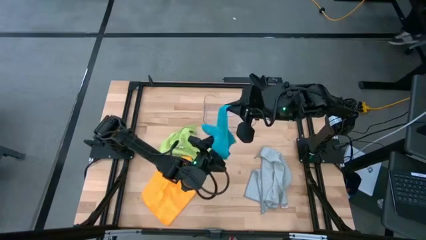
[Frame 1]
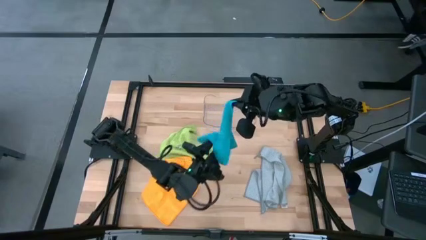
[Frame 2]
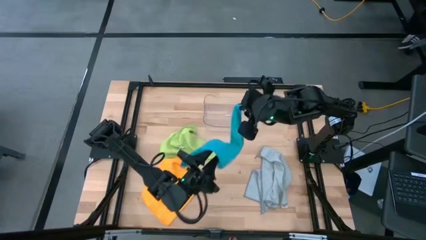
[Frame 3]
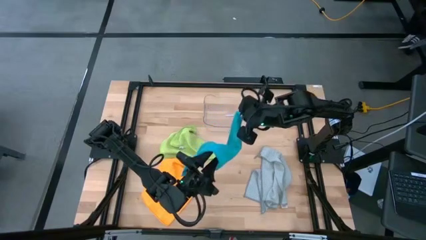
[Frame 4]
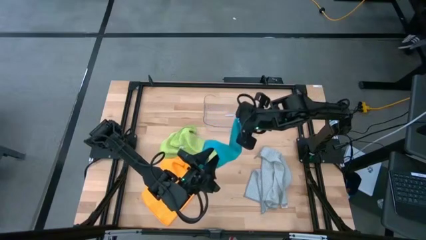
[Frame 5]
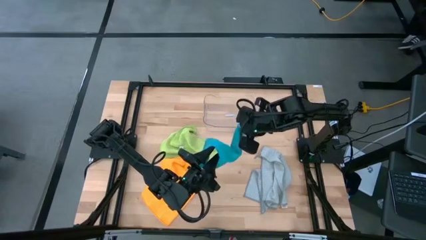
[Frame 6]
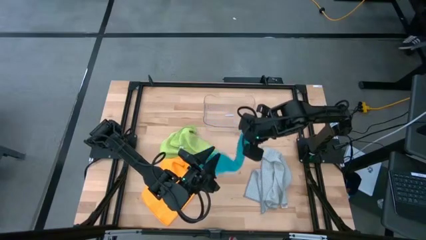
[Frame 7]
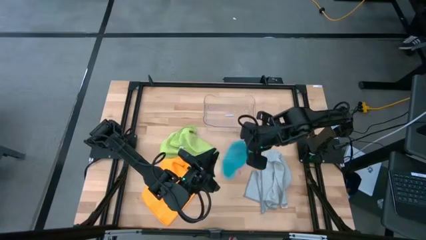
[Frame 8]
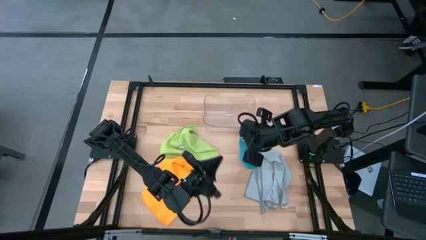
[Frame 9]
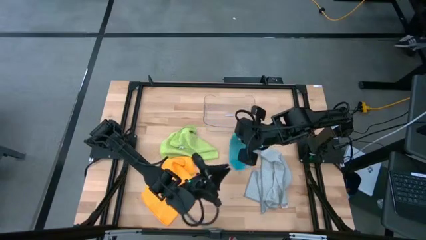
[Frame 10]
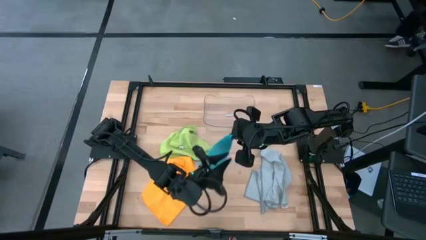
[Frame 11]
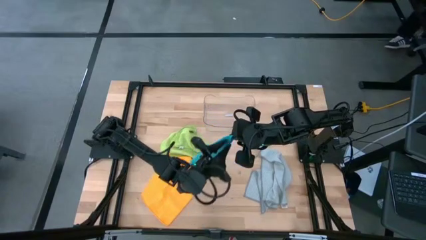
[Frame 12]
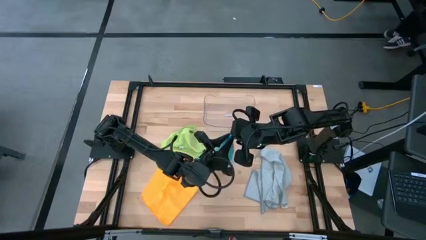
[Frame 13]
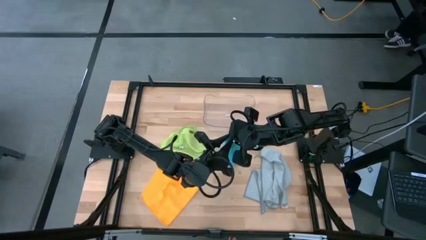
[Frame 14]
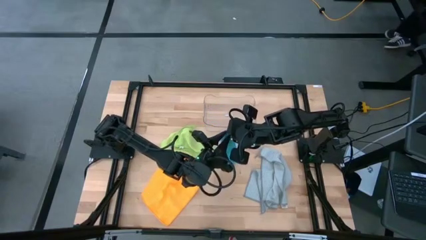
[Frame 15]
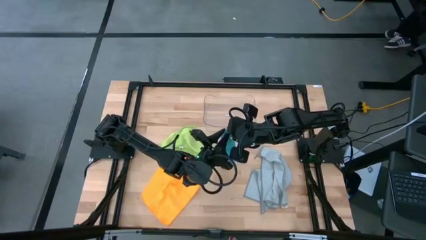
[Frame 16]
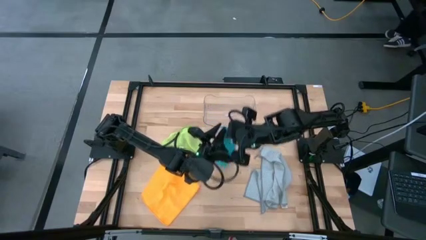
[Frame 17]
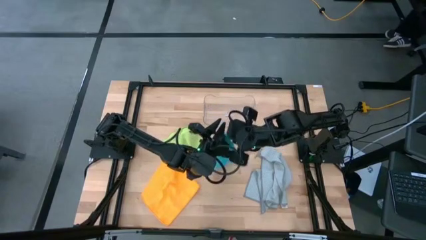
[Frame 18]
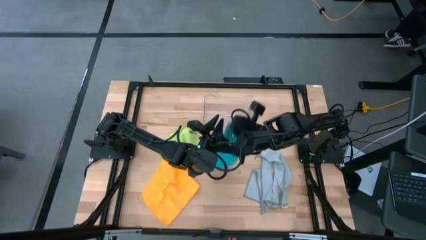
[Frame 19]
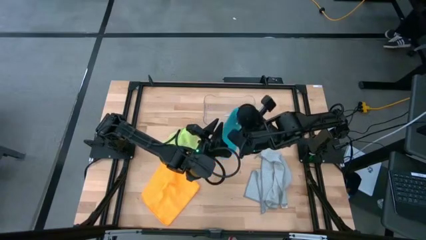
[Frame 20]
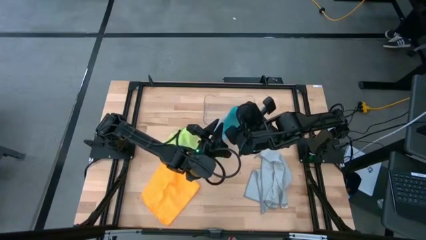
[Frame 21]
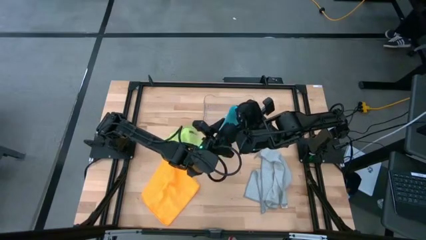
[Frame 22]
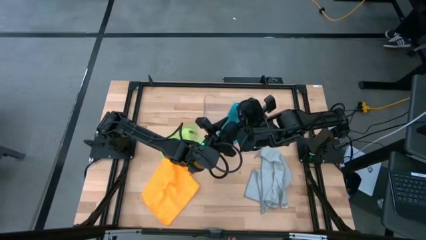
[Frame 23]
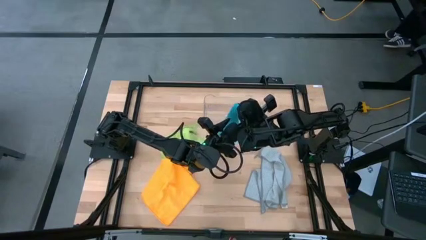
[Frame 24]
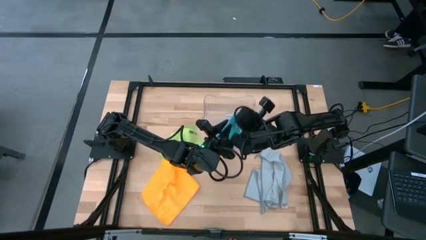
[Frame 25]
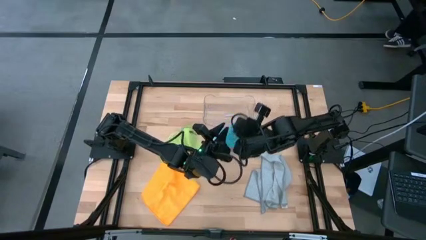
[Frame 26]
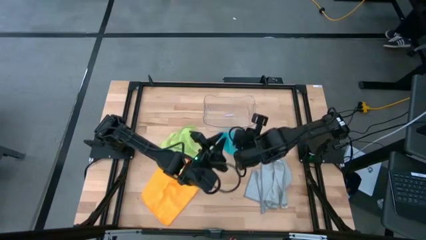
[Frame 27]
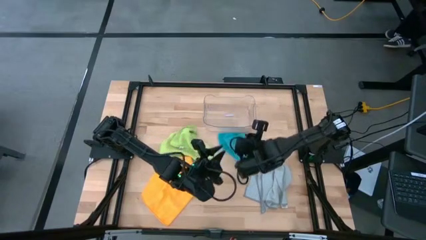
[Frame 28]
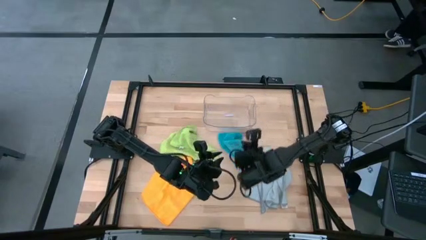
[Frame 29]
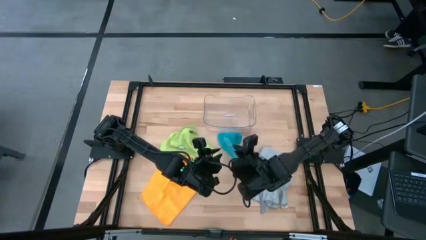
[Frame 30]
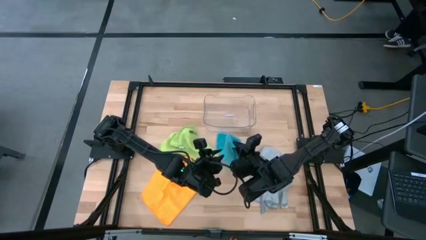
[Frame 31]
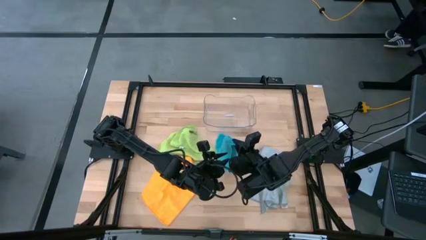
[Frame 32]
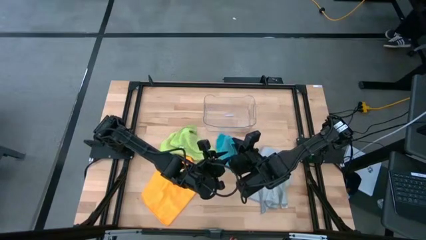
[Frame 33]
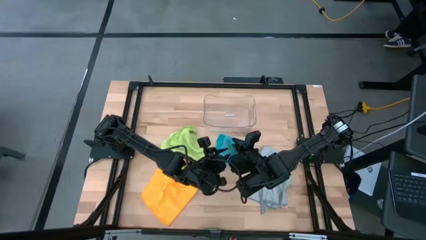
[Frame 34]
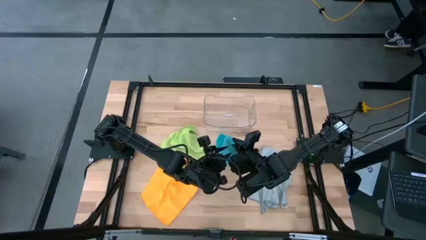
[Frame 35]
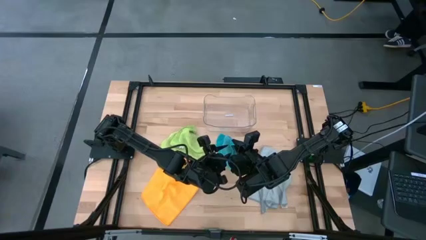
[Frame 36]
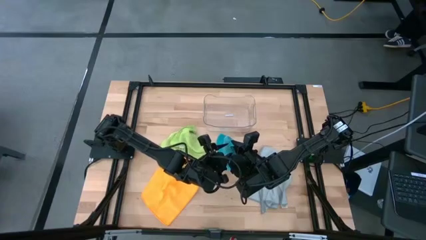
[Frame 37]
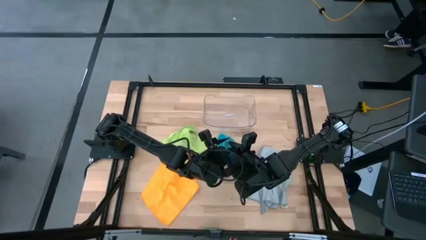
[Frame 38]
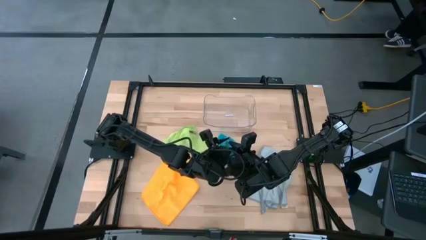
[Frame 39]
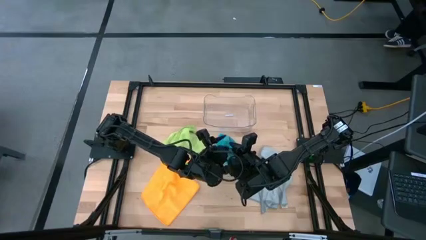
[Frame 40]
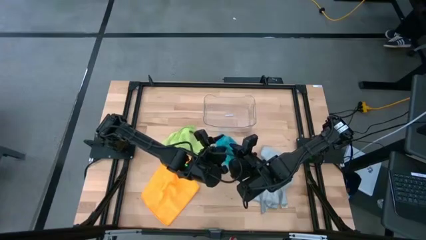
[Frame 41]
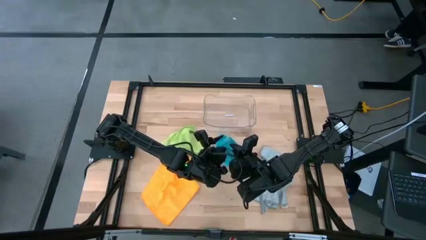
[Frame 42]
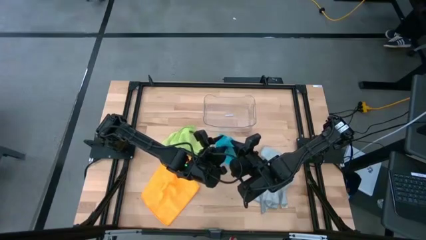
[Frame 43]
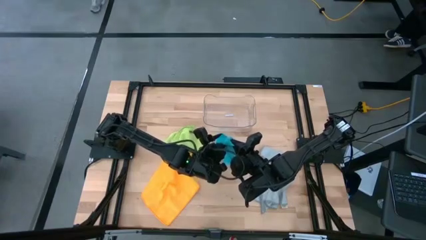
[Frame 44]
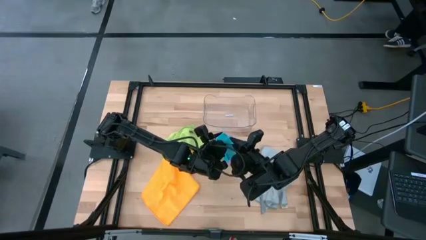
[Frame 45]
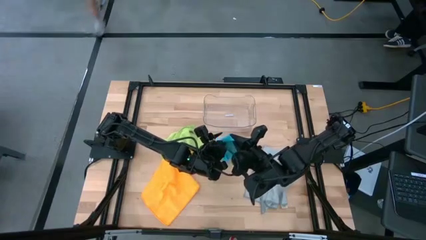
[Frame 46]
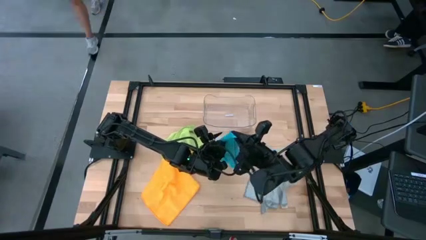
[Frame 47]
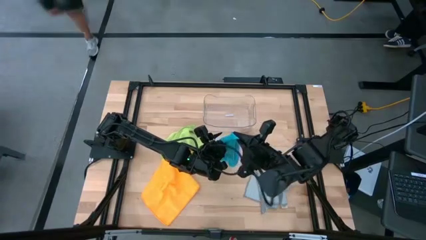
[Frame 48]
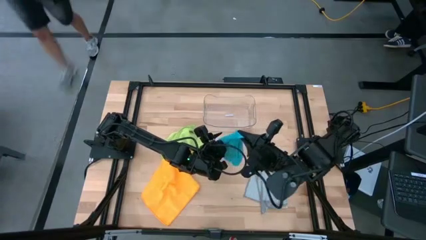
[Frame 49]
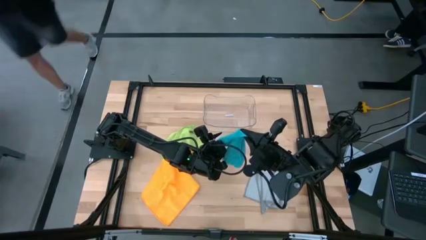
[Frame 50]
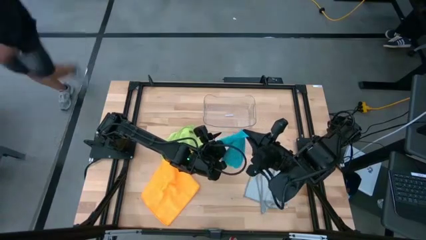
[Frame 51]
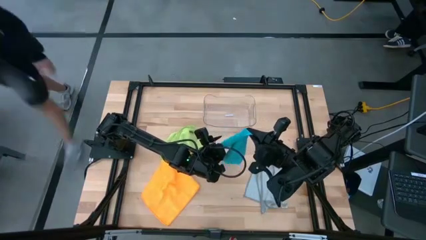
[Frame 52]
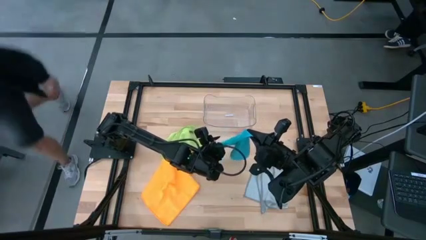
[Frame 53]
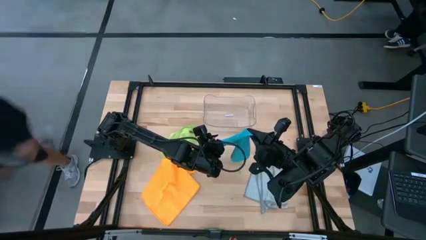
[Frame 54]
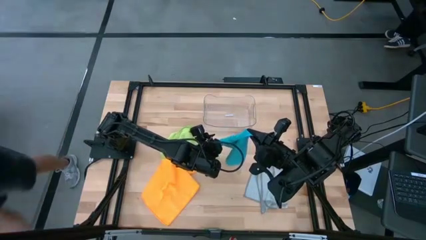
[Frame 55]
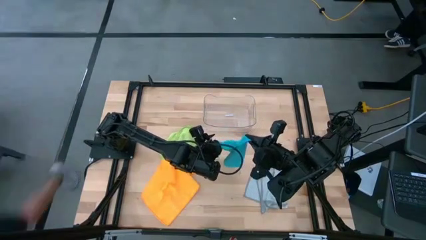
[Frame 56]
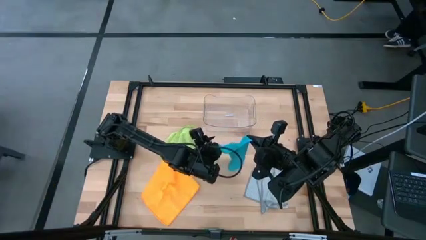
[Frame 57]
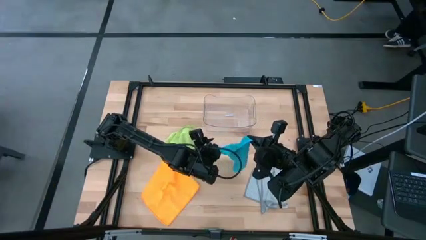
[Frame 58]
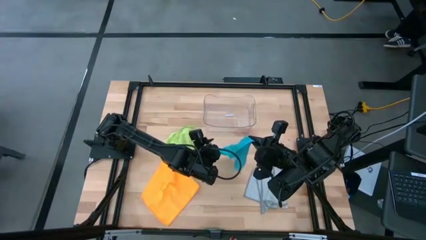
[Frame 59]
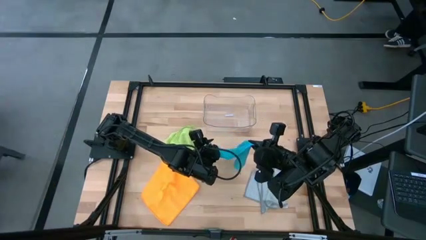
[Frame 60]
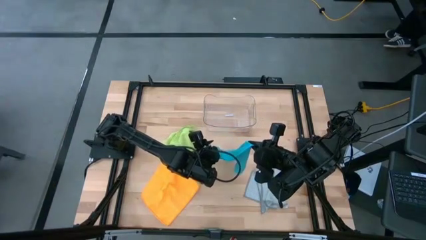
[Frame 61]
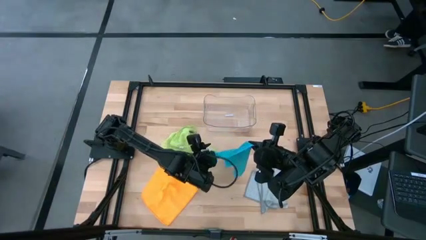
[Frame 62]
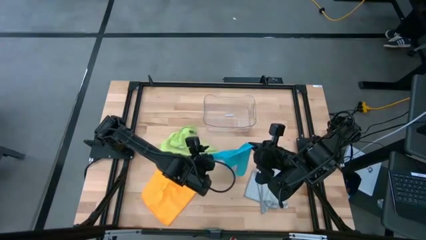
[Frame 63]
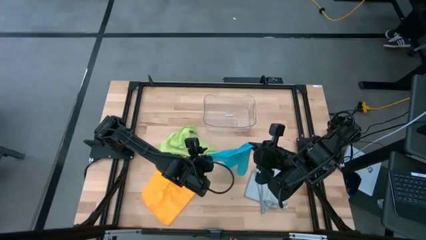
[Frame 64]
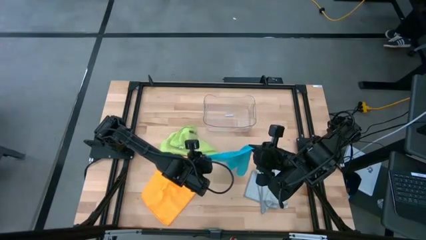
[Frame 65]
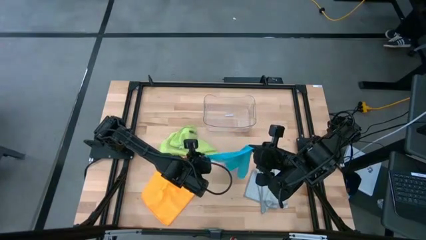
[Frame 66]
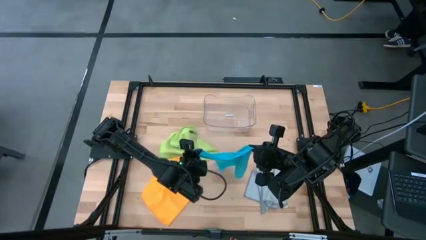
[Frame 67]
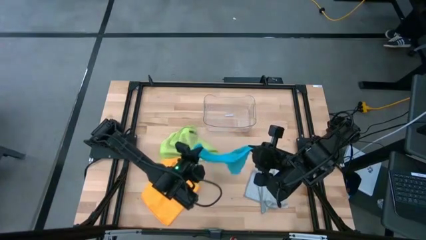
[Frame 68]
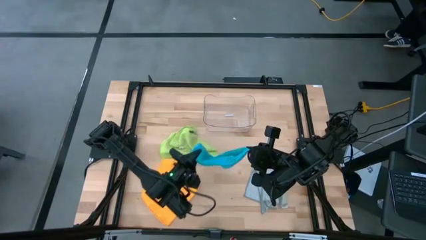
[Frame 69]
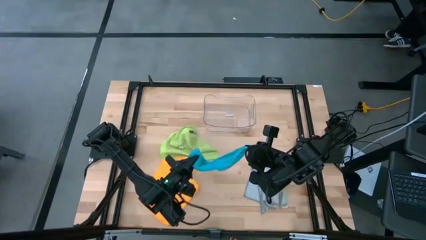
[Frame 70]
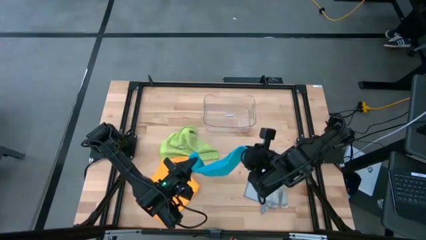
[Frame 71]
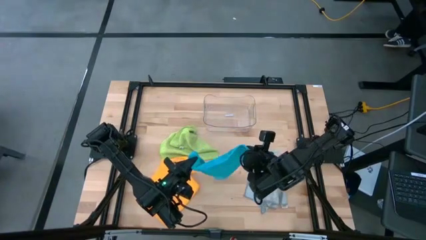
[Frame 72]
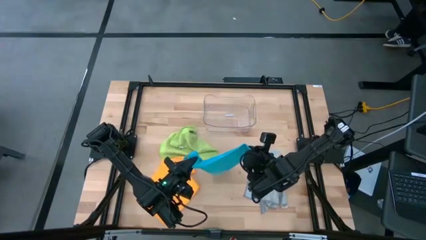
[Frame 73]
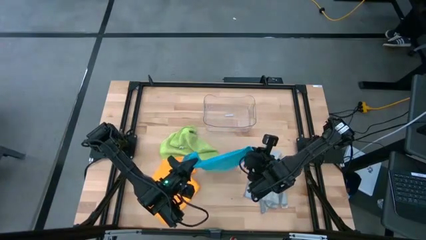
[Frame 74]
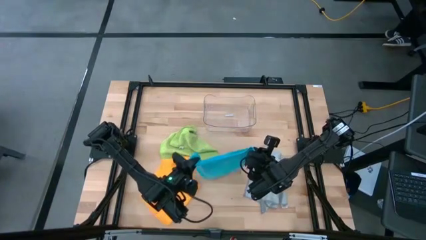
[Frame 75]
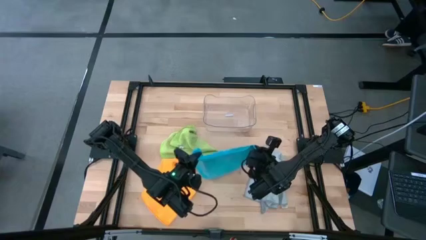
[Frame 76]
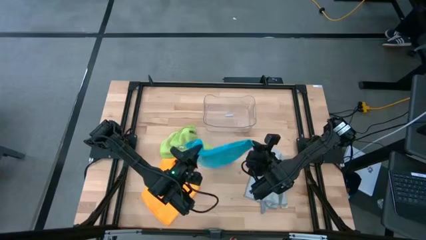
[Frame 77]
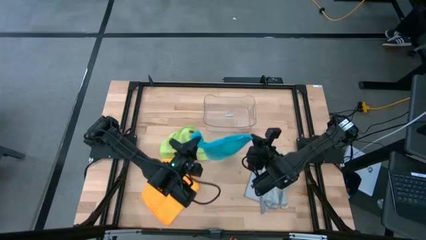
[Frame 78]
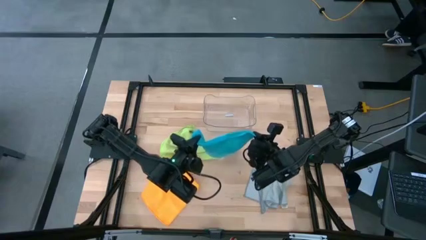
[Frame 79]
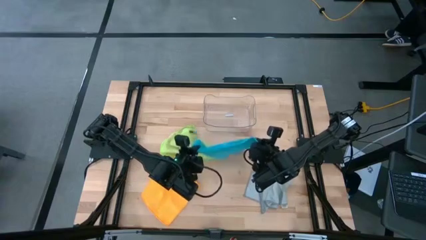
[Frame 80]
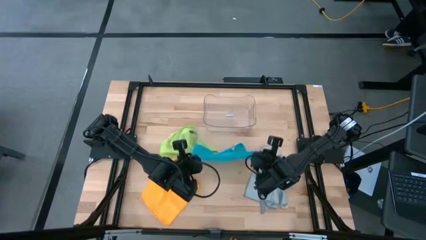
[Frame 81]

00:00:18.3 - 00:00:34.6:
Task: Fold microfiber towels
Fold the blue towel

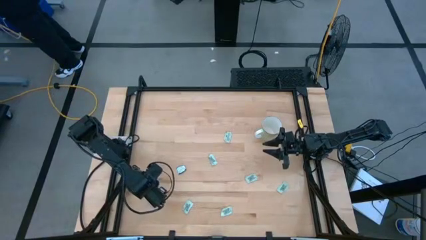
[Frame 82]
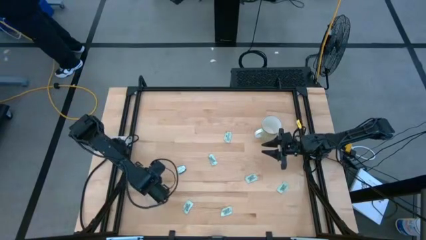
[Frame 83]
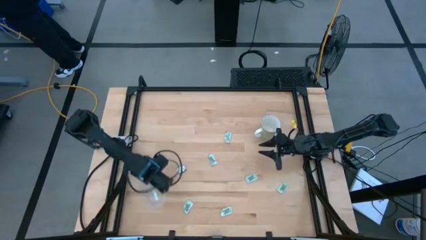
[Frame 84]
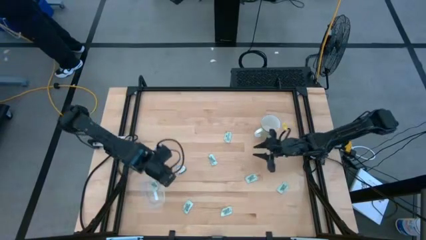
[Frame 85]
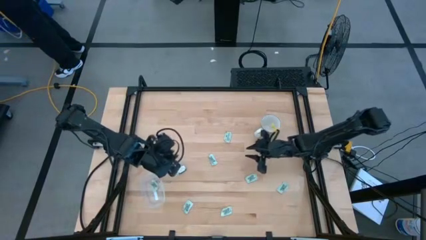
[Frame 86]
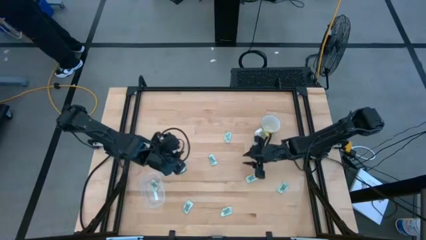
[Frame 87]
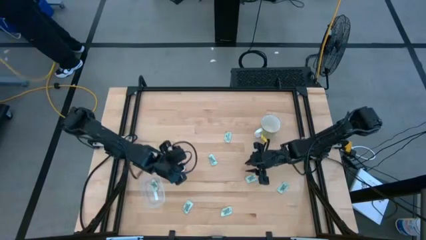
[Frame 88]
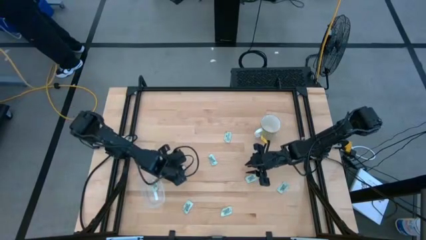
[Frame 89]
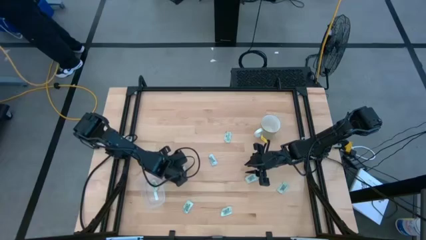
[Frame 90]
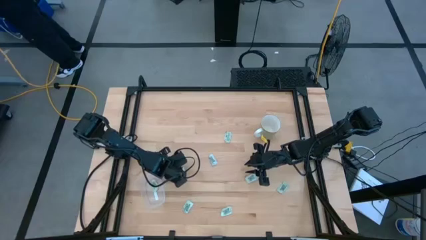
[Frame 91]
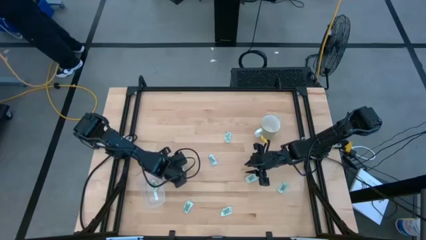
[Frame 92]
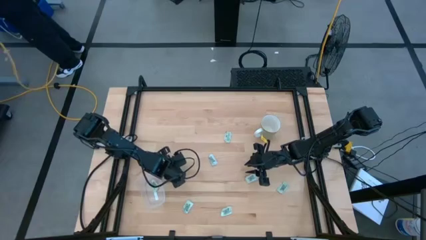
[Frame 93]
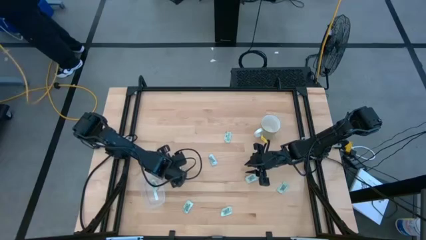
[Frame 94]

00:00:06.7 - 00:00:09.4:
Task: Pick and place Stevia / Truvia into bins
Put the truvia packet into the transparent bin
